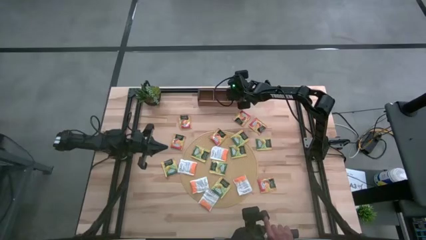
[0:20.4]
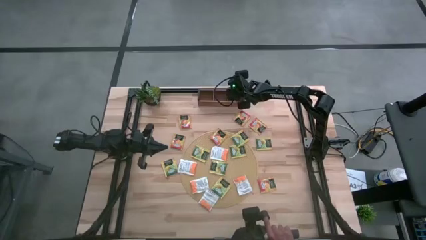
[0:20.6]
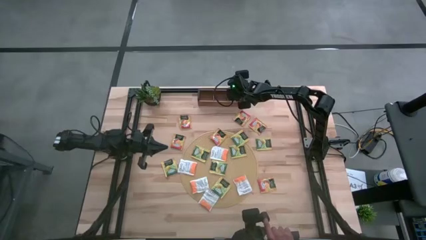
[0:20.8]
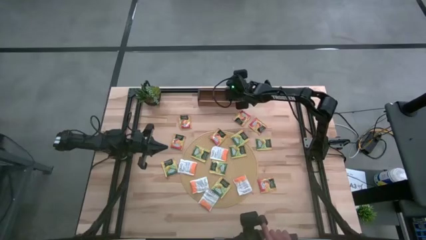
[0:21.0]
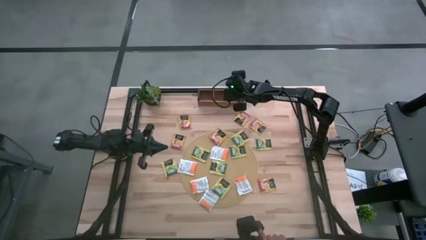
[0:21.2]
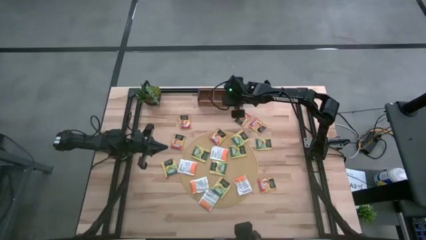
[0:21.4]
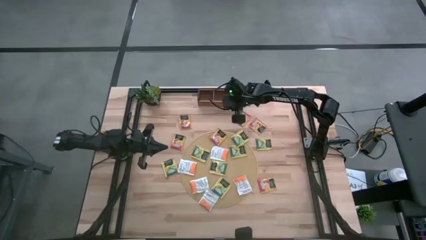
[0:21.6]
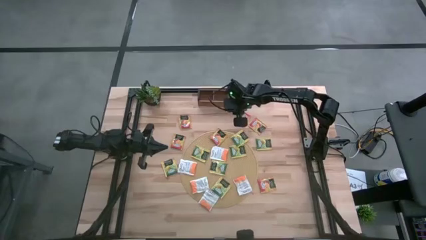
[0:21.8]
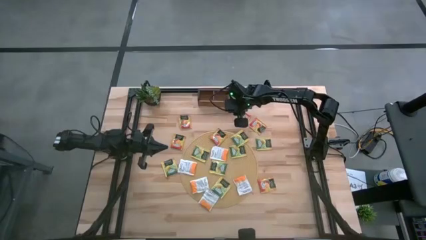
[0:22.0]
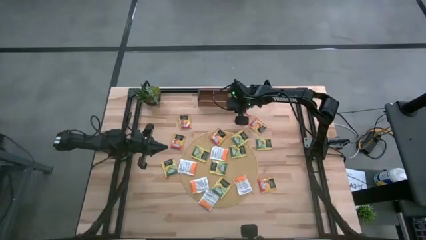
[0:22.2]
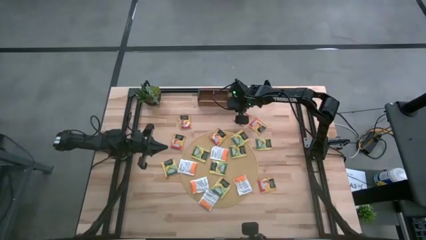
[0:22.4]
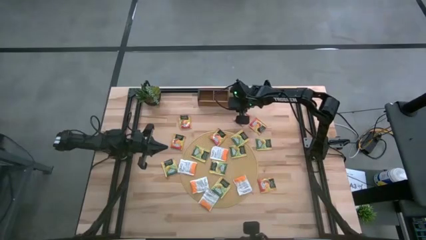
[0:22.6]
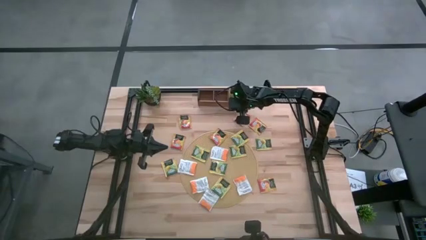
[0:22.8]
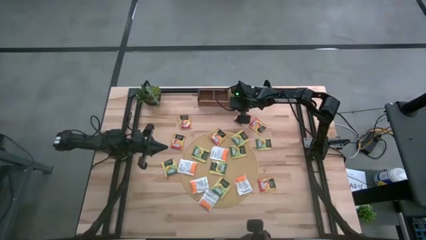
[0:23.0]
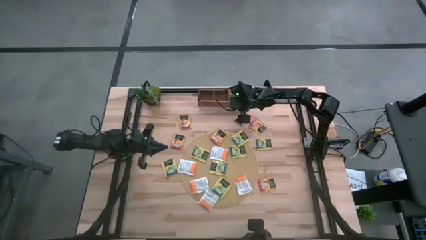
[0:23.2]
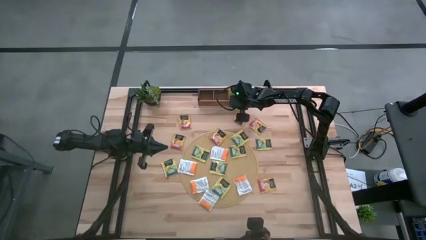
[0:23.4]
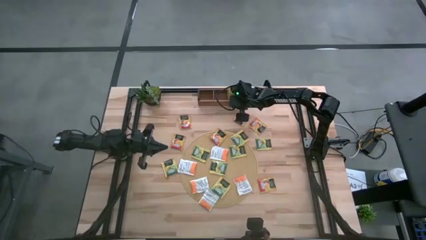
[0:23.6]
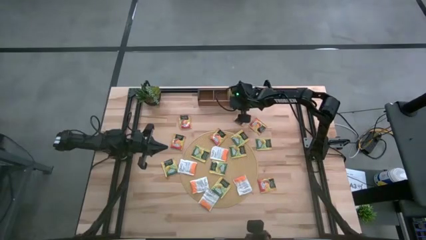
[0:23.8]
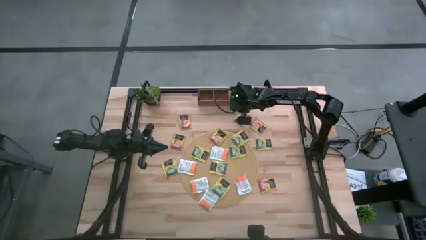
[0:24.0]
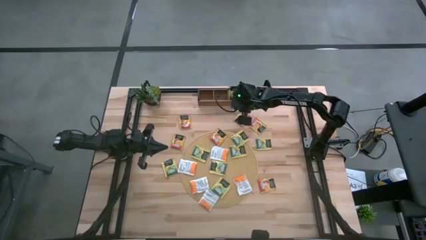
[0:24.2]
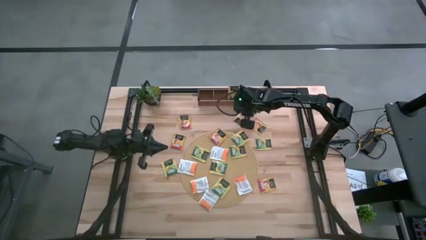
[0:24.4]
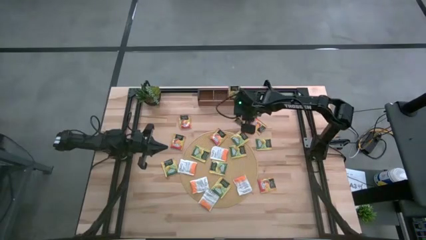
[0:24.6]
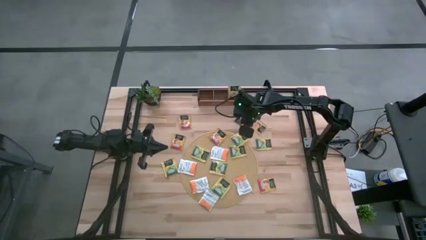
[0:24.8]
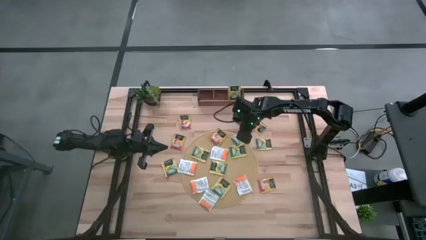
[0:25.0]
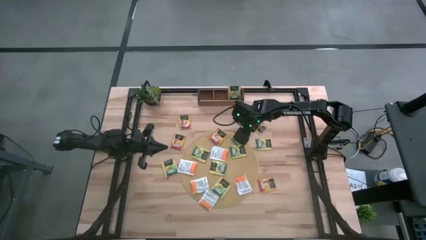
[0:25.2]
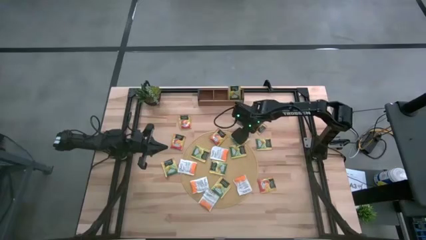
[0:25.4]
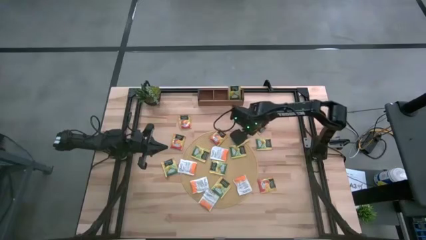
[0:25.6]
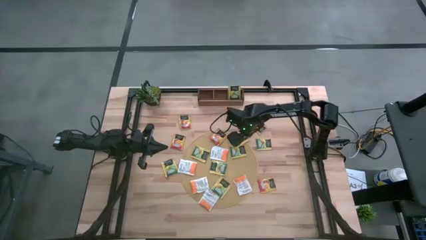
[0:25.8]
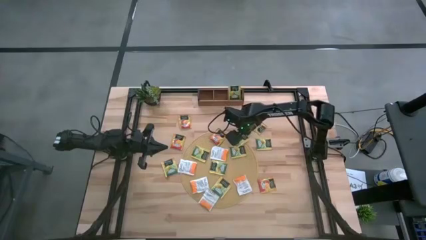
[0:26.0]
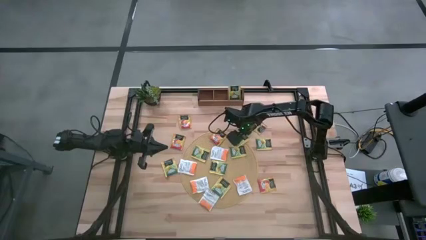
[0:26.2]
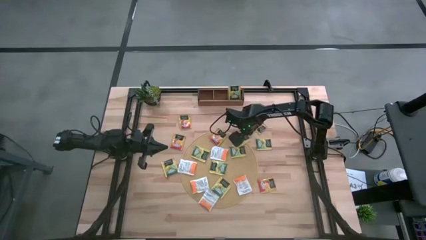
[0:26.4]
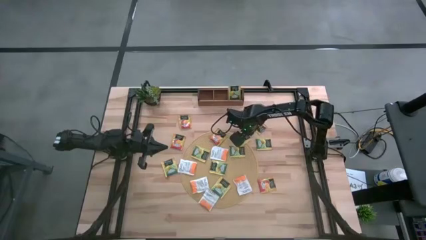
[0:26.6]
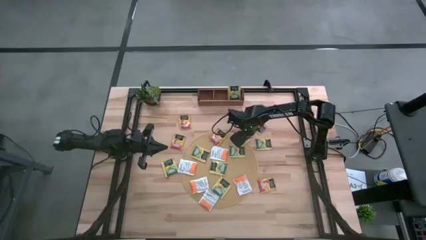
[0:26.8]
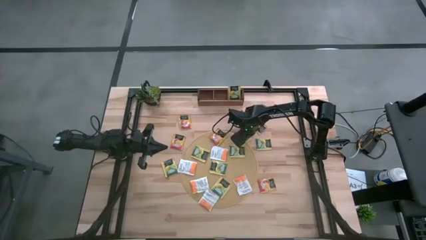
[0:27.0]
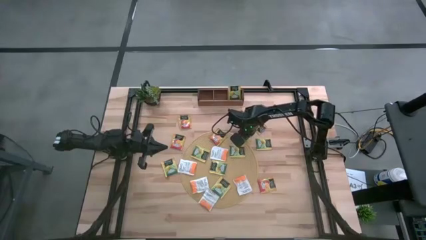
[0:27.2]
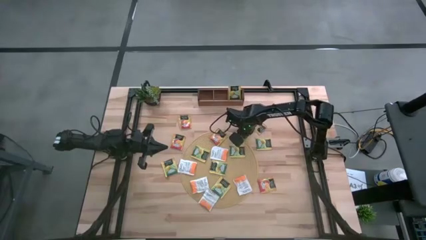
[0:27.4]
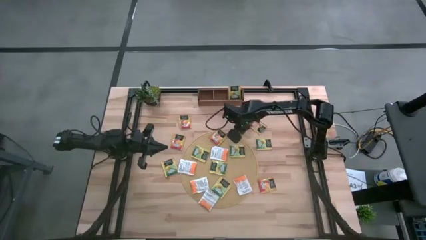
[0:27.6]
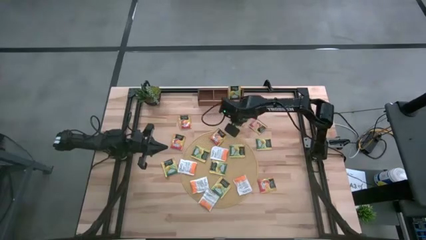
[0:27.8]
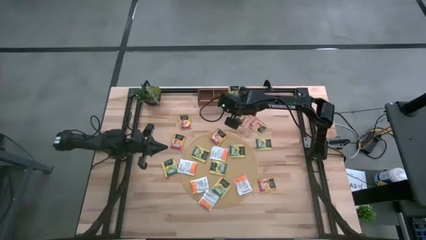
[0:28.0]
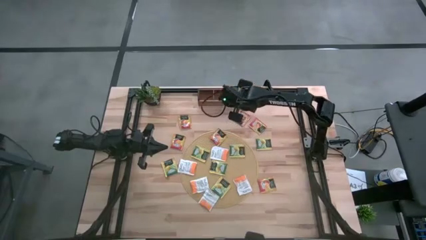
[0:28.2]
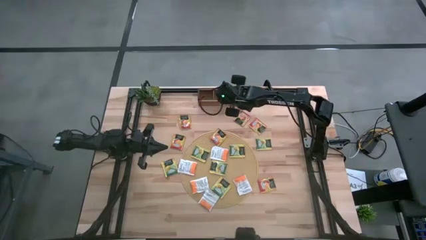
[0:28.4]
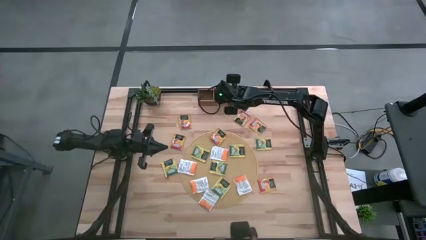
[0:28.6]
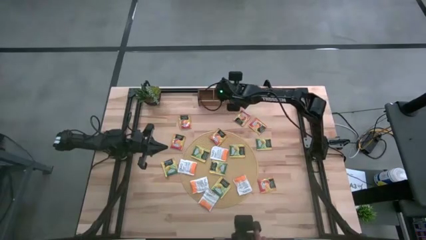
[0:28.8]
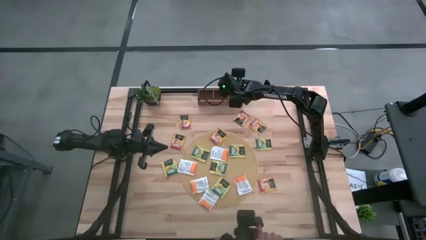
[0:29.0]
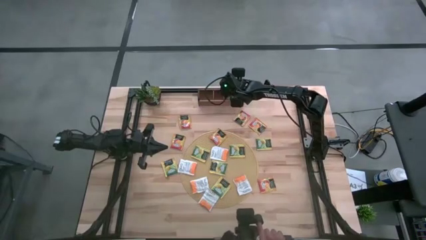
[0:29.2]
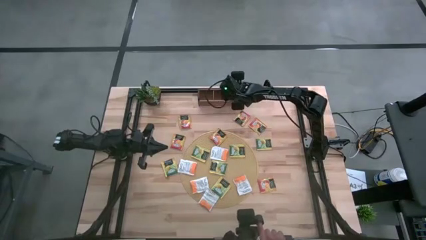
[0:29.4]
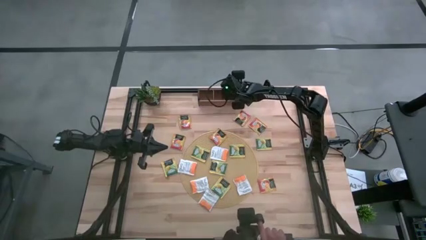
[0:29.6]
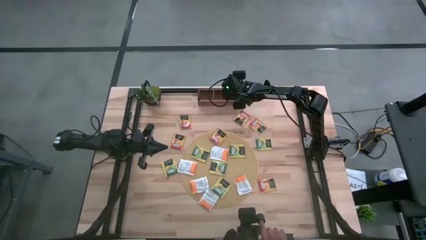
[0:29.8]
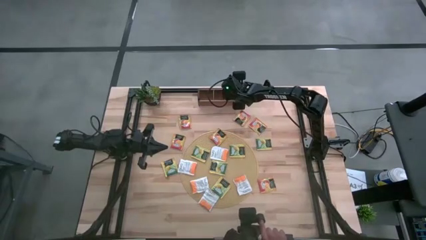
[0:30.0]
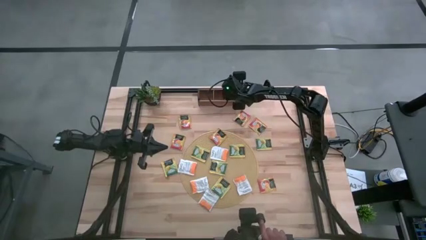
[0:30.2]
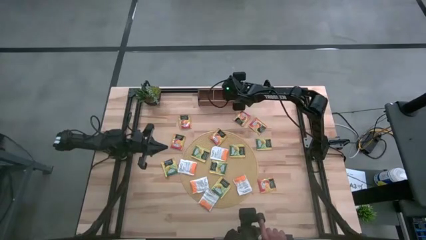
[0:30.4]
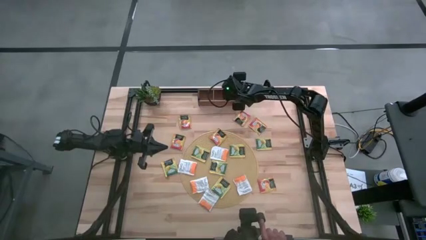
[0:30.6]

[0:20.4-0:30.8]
Task: Pick & Place Tea
Put the yellow tea bag into the right section of the wooden organizer

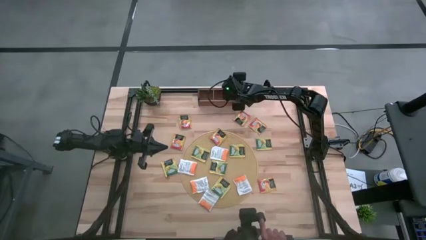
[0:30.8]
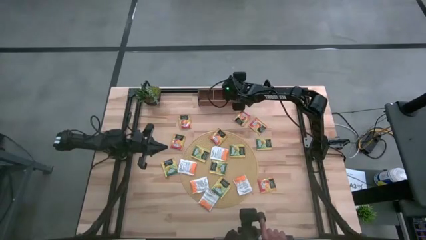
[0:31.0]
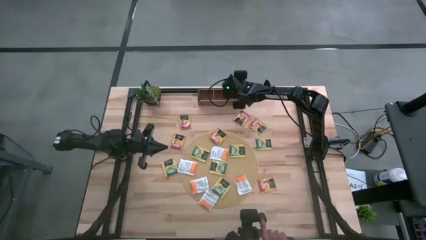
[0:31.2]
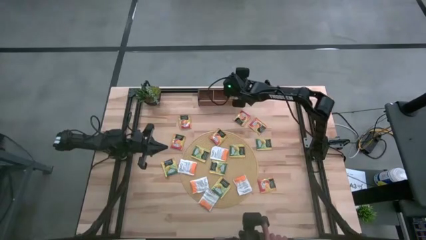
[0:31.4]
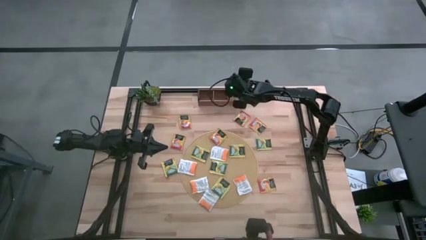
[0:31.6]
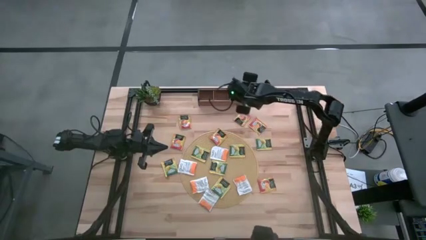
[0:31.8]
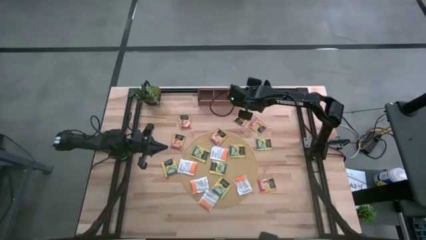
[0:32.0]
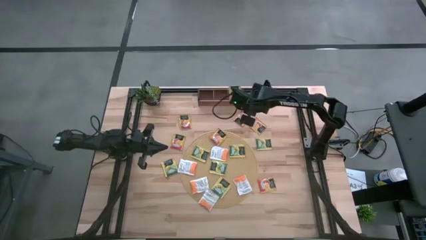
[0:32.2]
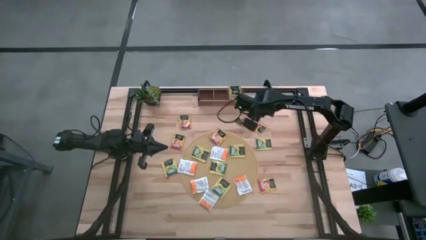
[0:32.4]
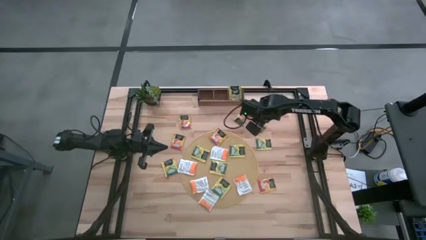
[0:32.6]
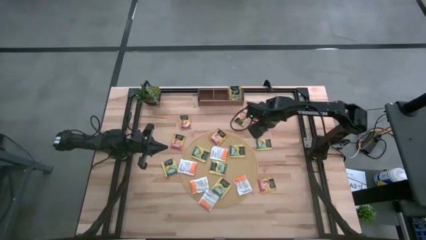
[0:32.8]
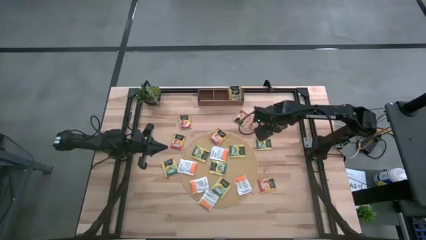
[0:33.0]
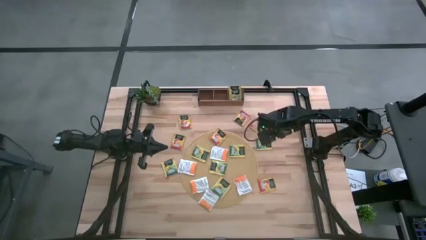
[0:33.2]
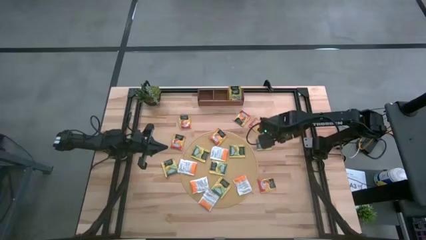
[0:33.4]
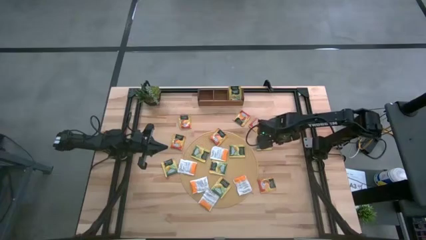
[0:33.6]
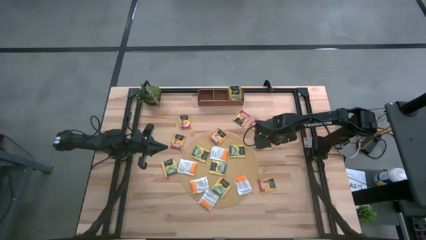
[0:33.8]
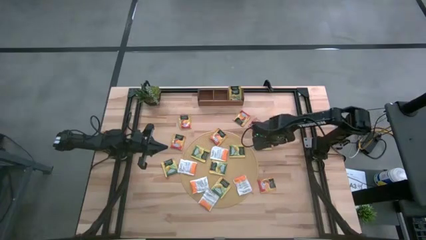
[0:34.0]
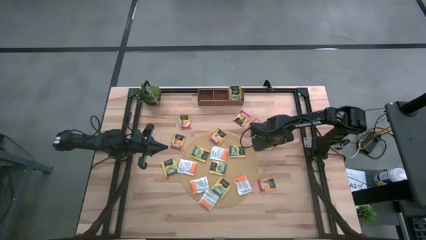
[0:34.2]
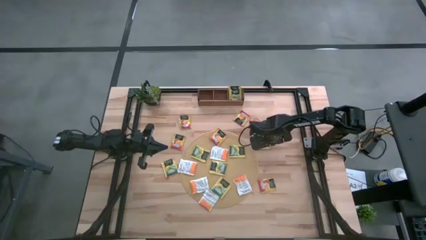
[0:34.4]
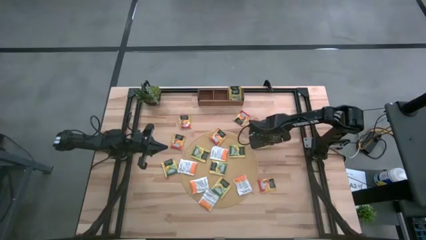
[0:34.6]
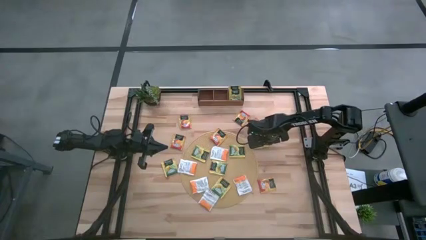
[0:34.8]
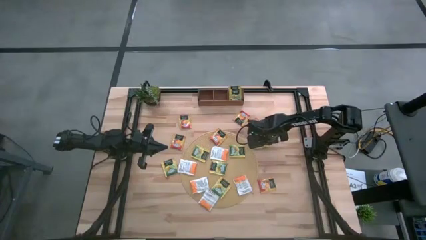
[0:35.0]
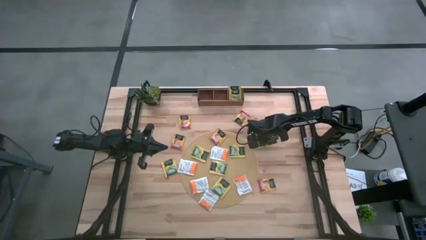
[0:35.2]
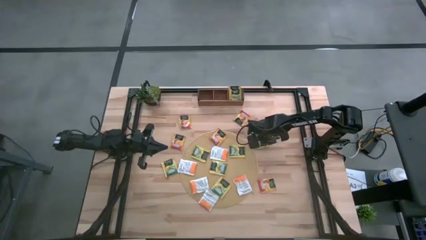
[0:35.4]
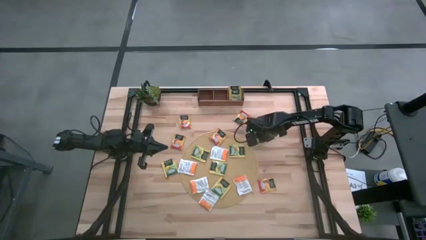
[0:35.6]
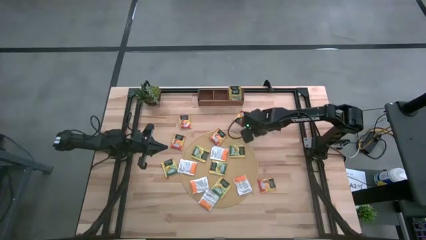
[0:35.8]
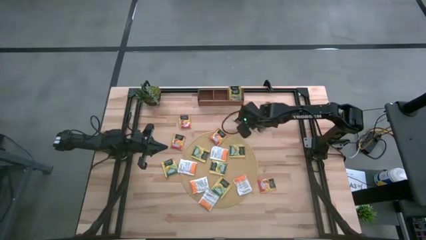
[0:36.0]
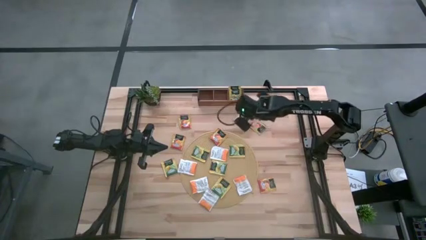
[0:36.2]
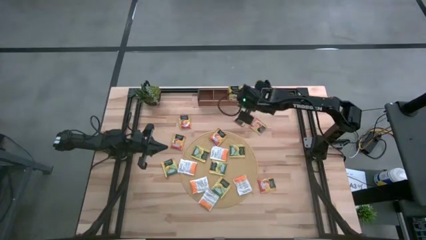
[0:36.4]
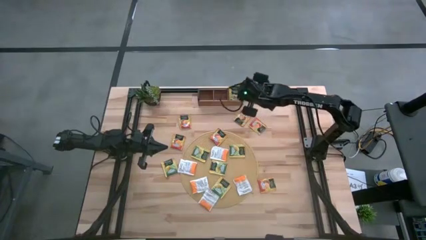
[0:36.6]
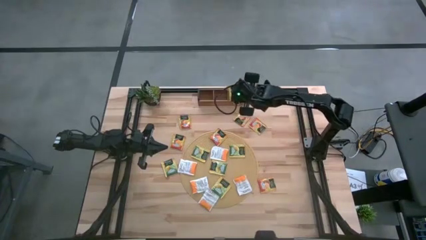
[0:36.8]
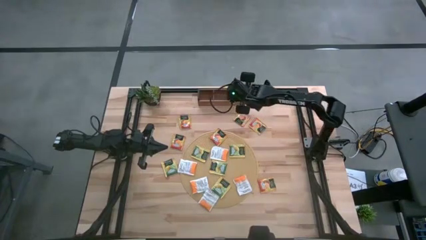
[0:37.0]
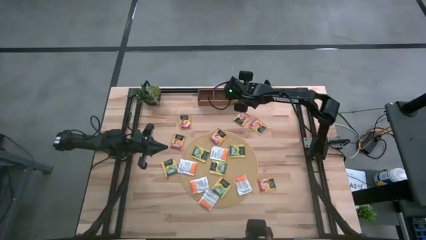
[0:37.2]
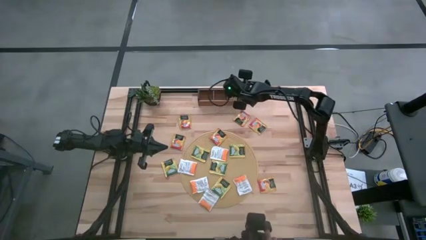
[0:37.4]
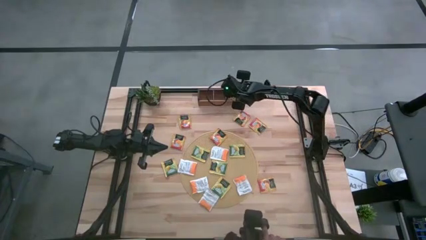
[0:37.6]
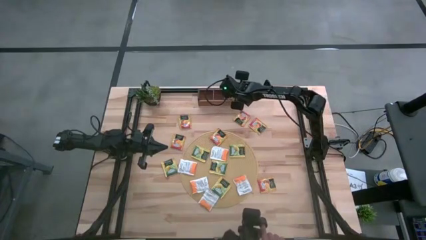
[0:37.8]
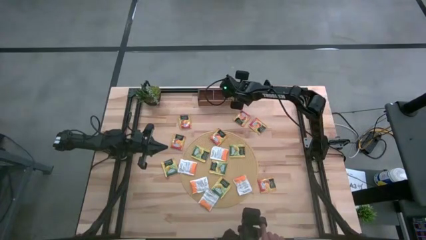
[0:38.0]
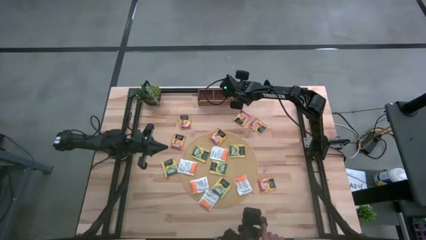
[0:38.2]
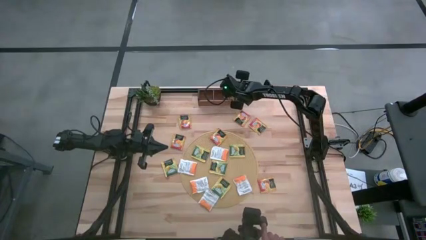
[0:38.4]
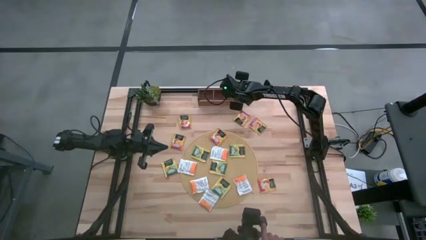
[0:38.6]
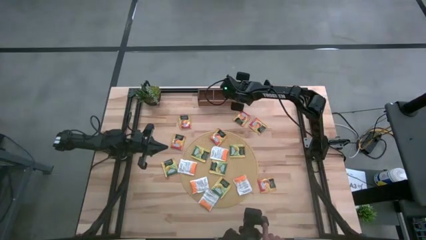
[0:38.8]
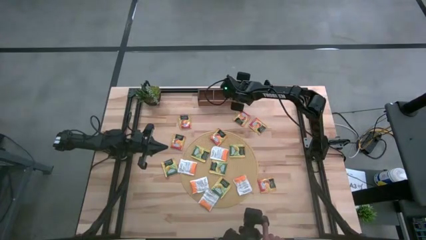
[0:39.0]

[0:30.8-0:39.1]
Put the yellow tea bag into the right section of the wooden organizer
